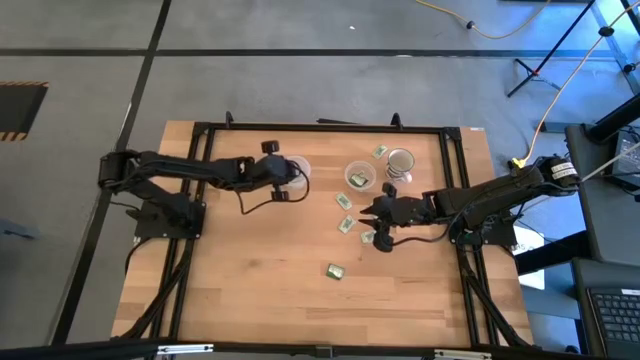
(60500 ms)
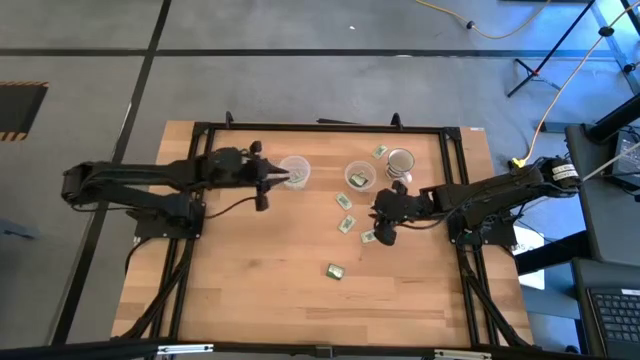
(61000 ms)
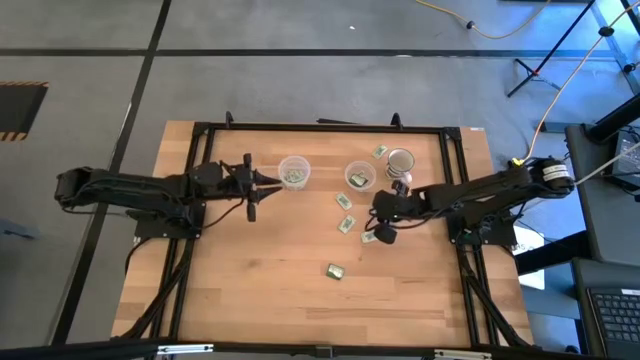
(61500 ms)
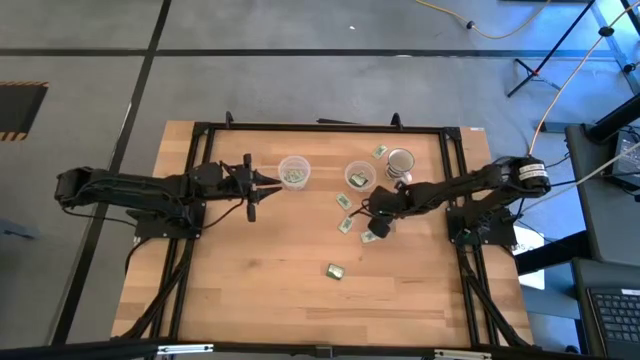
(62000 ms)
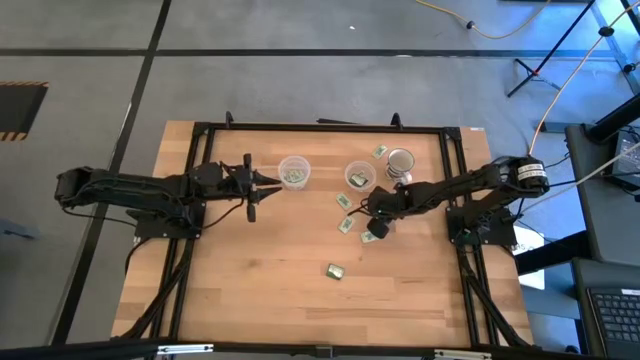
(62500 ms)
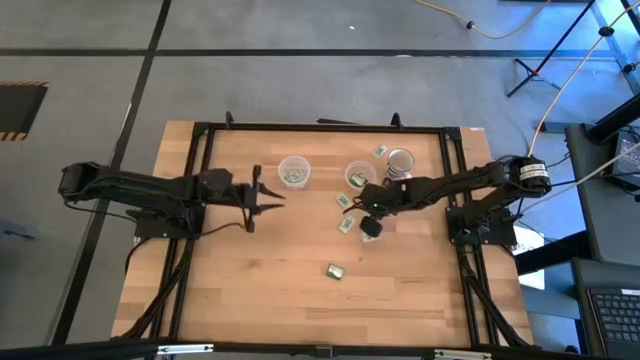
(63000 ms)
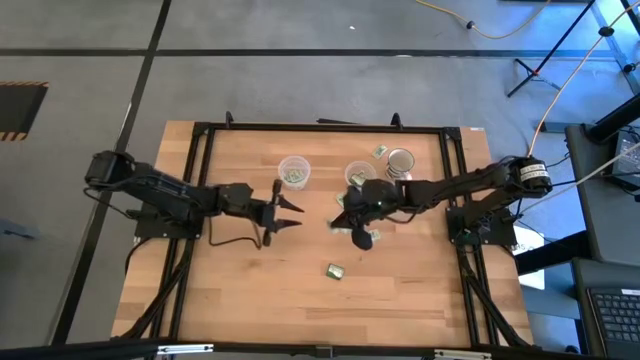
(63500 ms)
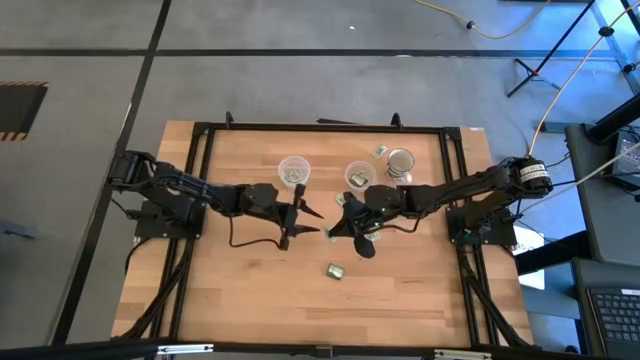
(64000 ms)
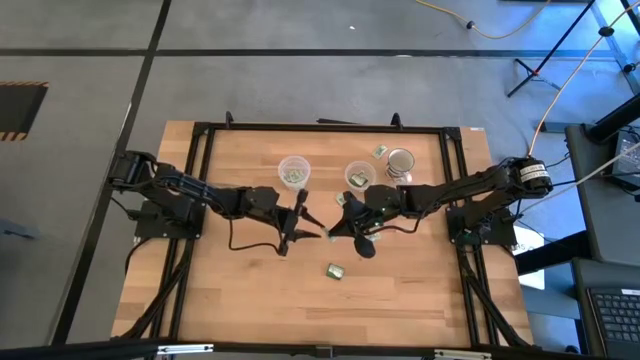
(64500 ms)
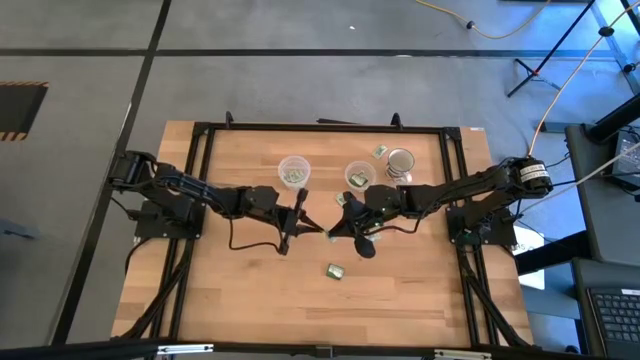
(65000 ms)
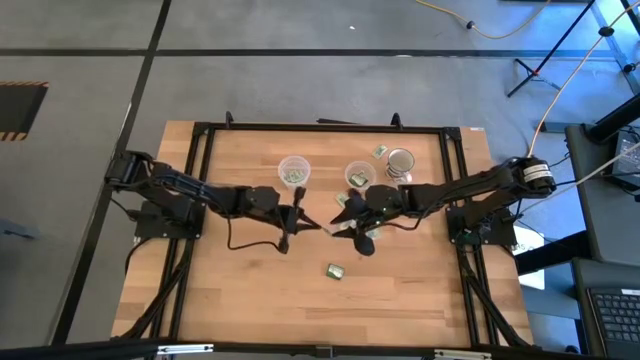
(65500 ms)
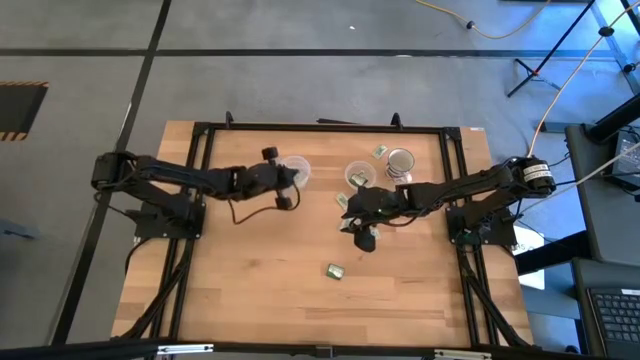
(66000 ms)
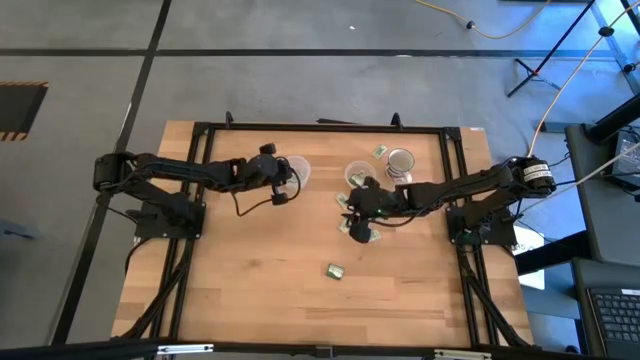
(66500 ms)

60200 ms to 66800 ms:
Task: Pick and place Stevia / Truvia into bins
Put the white stevia packet into the large transparent container

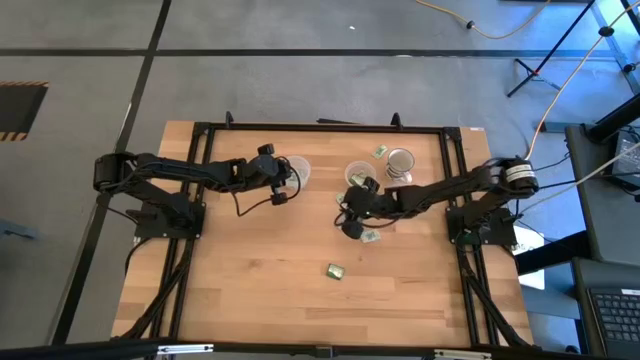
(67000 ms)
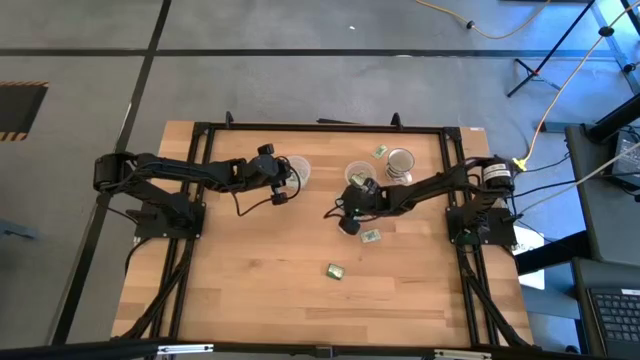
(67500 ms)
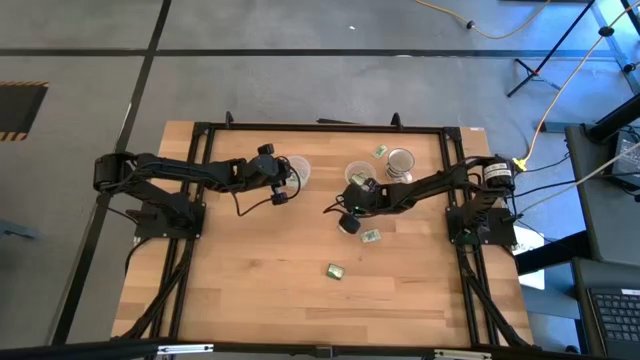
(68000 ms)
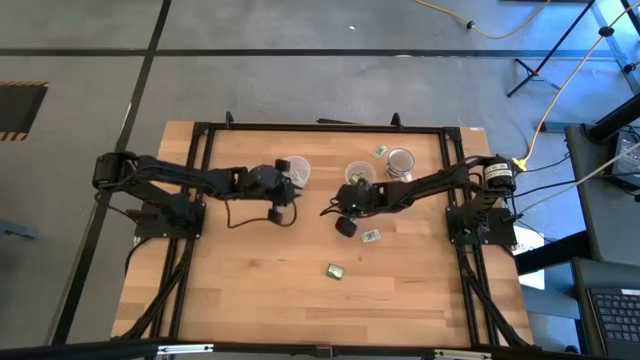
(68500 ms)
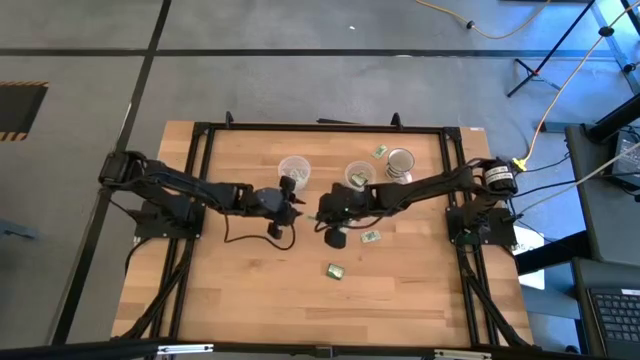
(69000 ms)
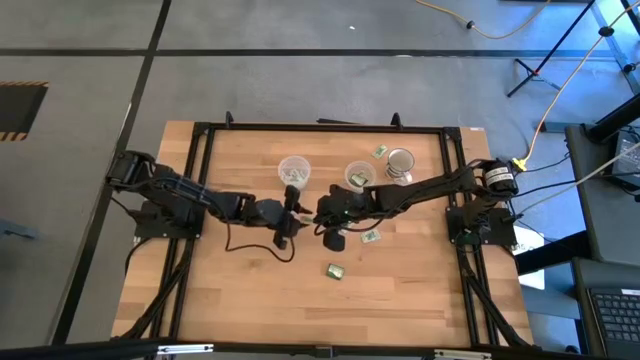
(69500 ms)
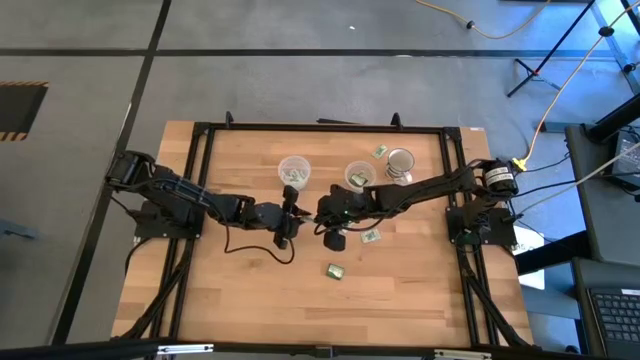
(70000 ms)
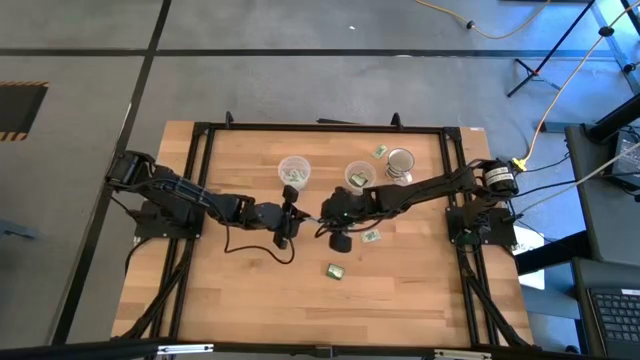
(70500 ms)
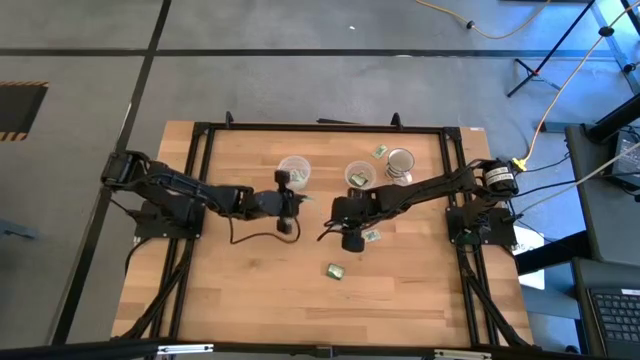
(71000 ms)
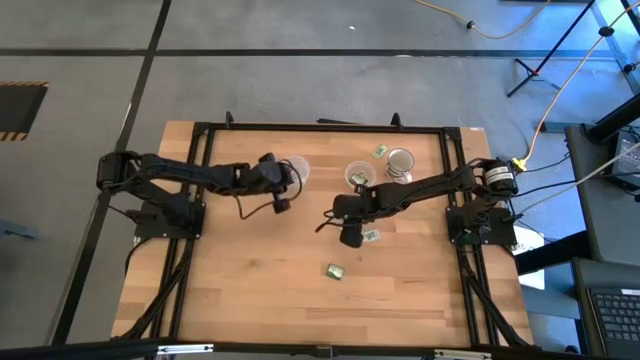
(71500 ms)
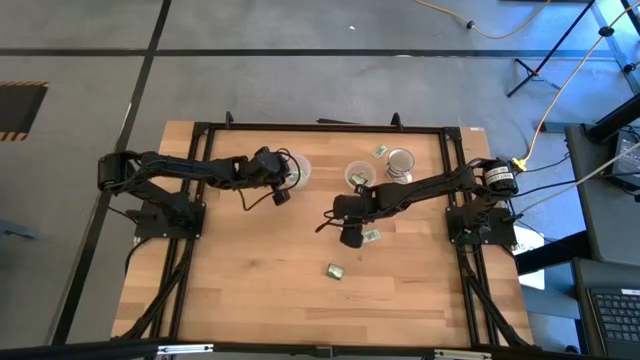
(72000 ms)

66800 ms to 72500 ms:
Put the white stevia packet into the large transparent container

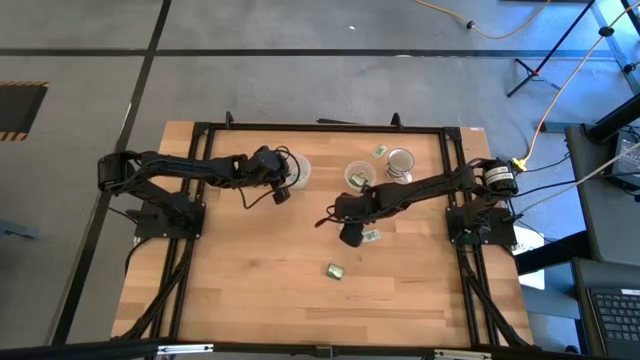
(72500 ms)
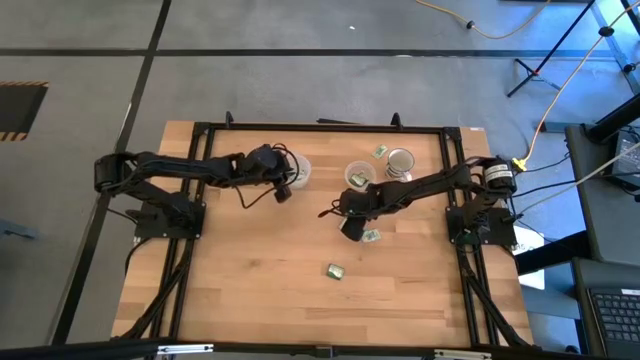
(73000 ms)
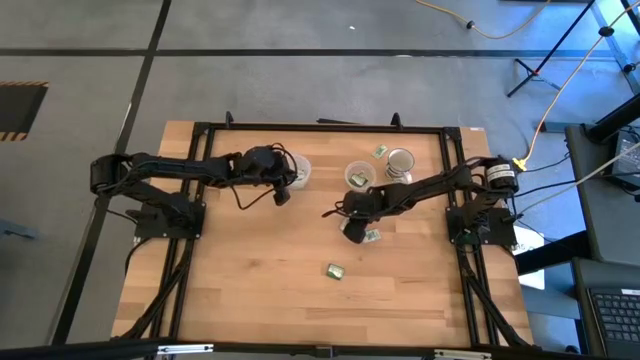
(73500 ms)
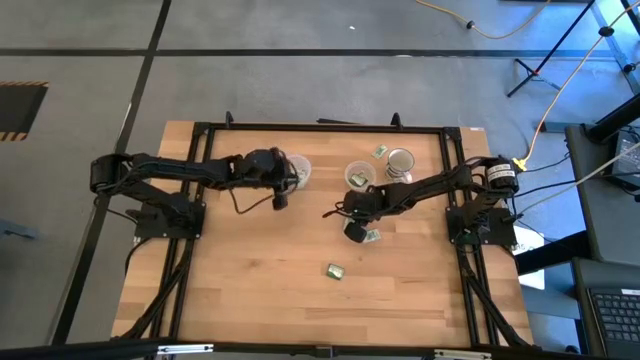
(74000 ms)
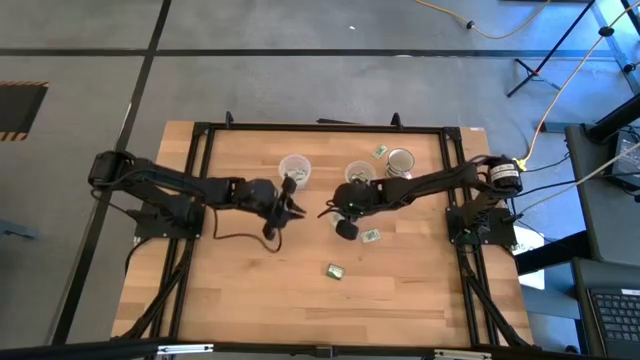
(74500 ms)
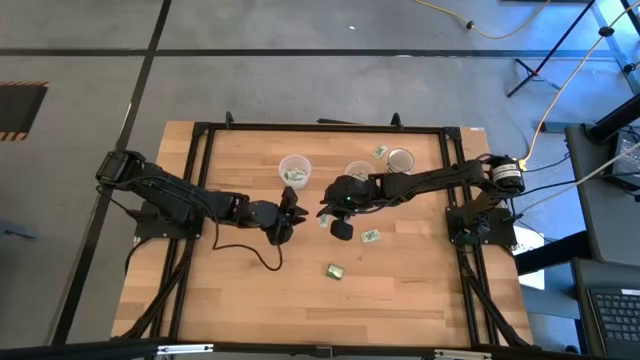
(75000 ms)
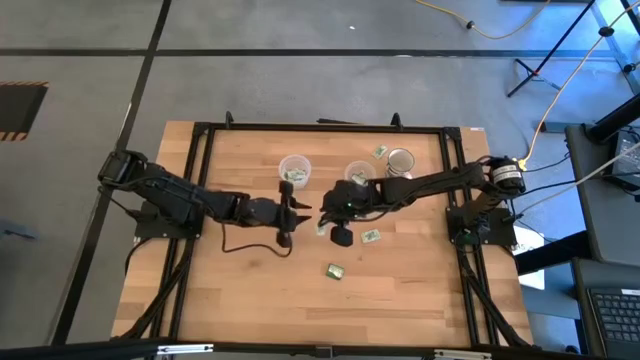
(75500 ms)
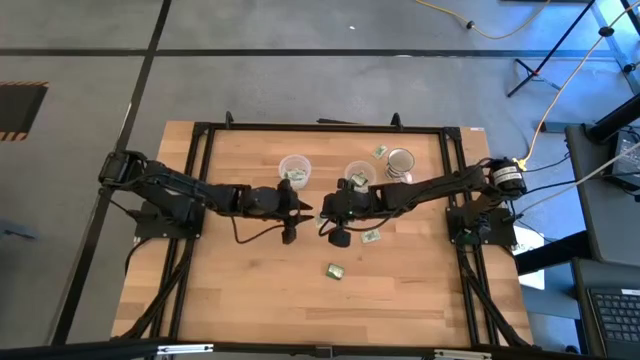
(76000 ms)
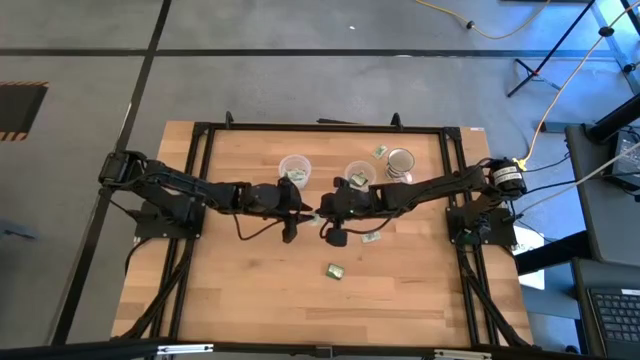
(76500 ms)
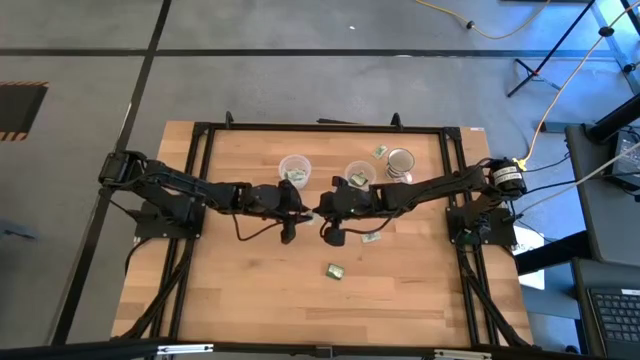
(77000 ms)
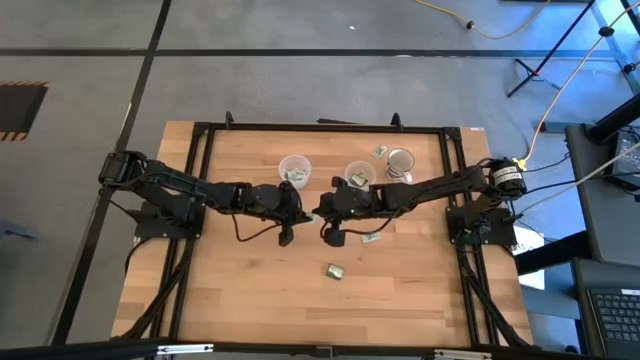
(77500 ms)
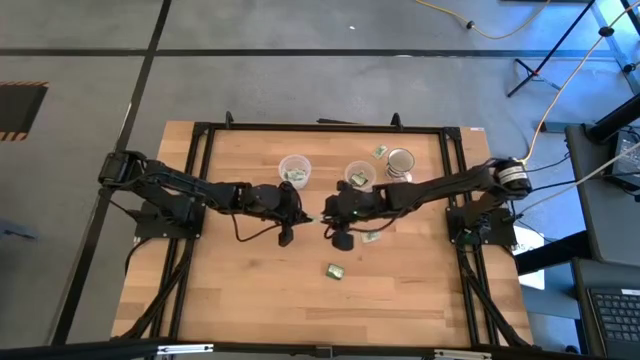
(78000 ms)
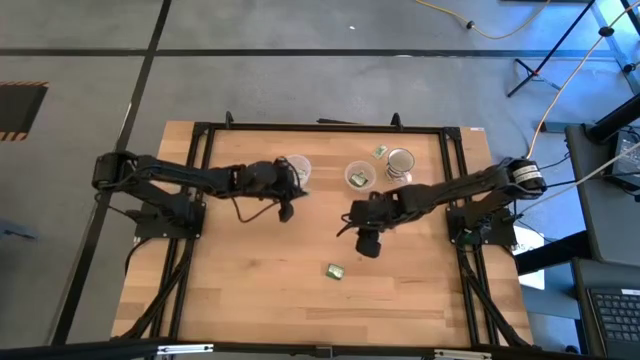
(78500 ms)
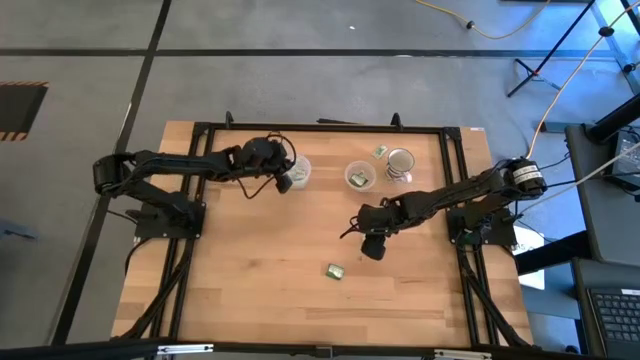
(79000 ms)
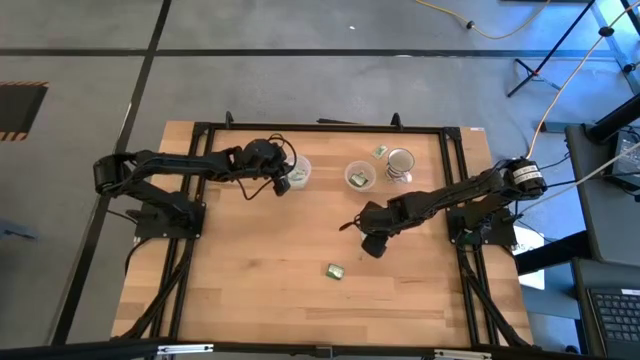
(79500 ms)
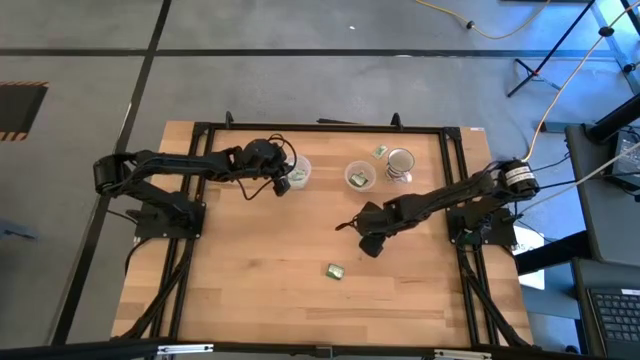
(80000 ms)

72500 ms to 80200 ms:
Put the white stevia packet into the large transparent container

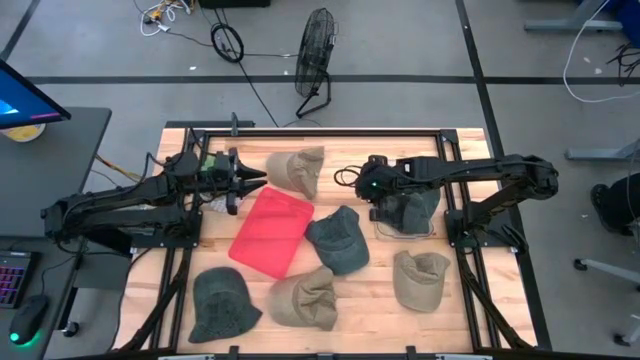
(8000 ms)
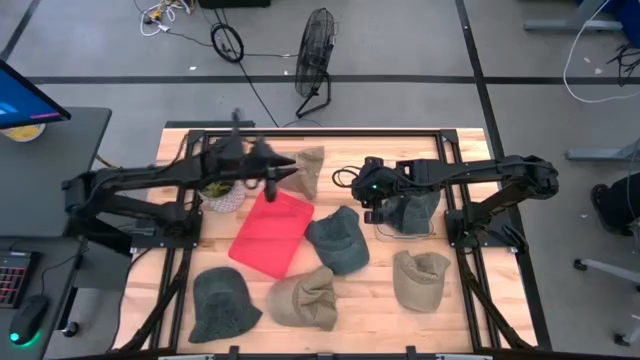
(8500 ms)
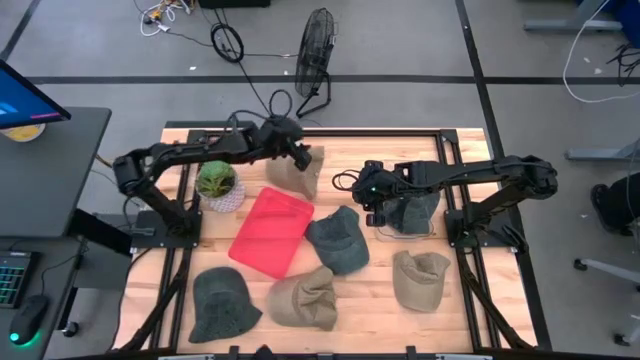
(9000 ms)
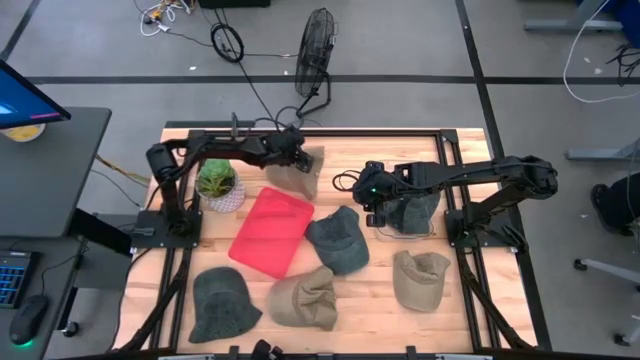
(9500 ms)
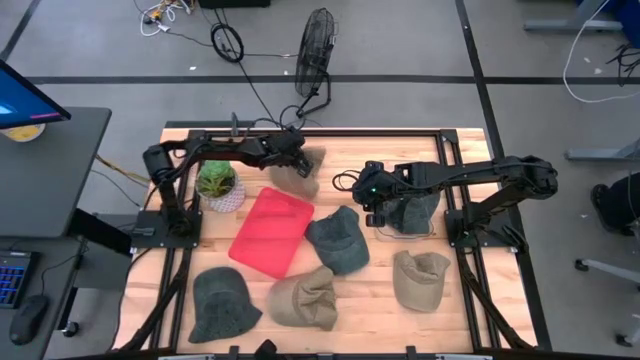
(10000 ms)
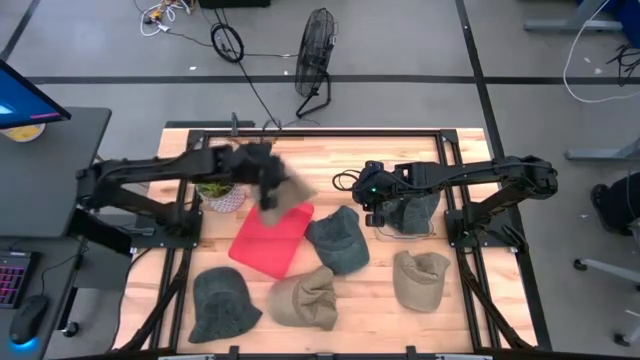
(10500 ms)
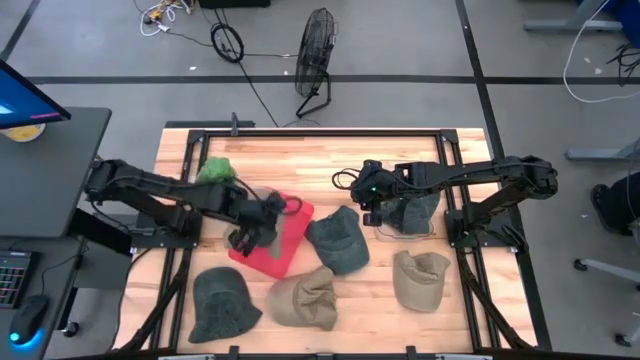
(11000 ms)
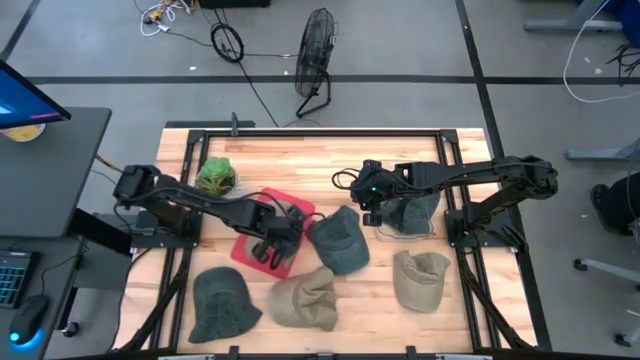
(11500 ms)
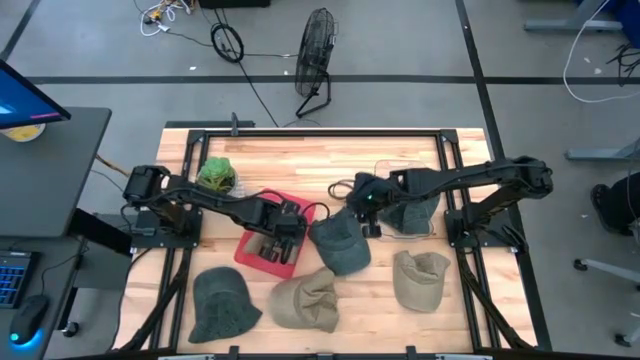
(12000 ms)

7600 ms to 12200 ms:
Task: Pick & Place hat
Put the top brown cap into the red bin
